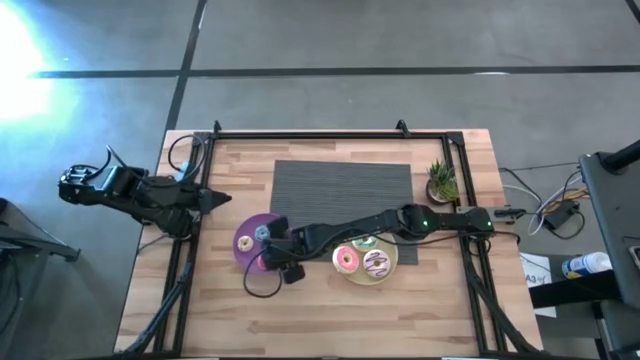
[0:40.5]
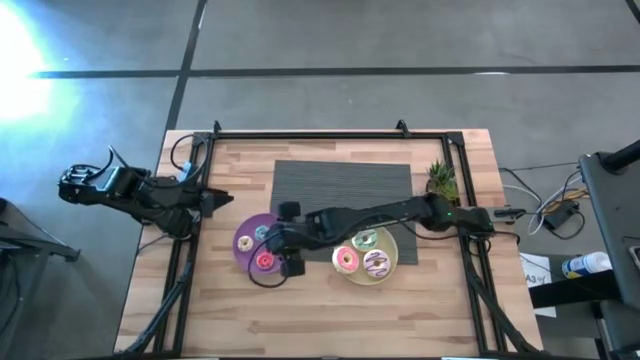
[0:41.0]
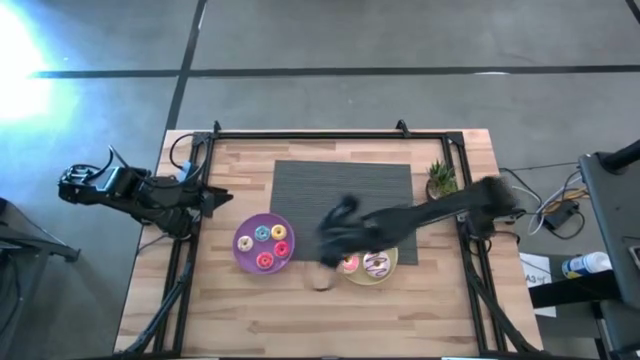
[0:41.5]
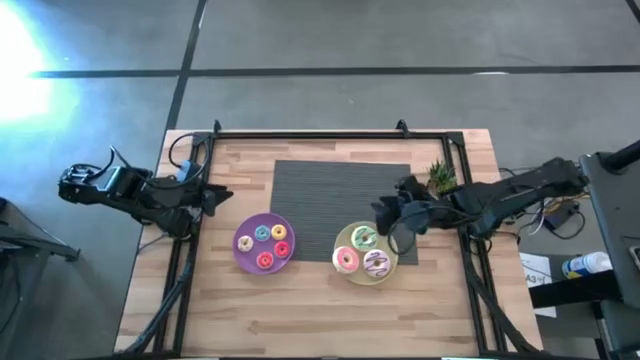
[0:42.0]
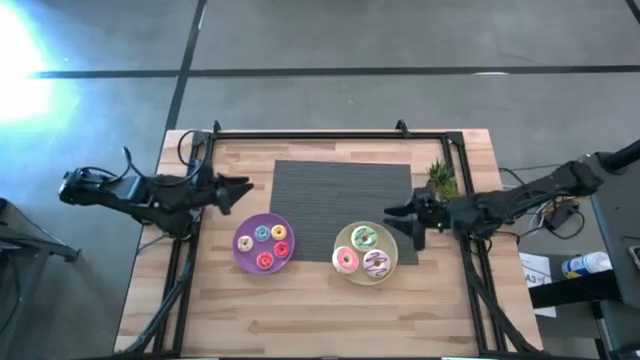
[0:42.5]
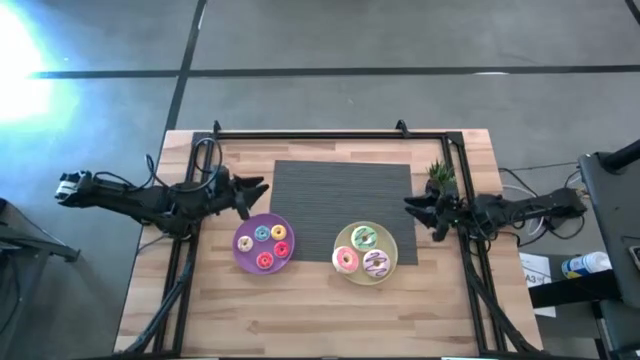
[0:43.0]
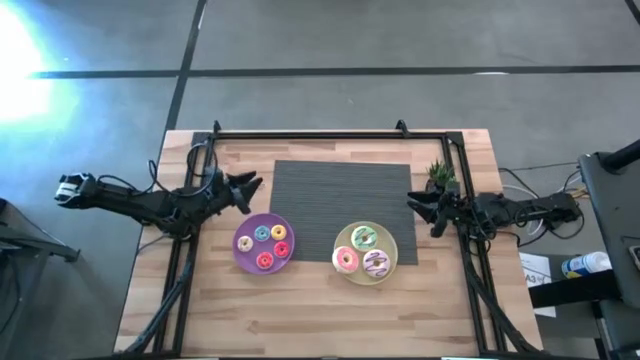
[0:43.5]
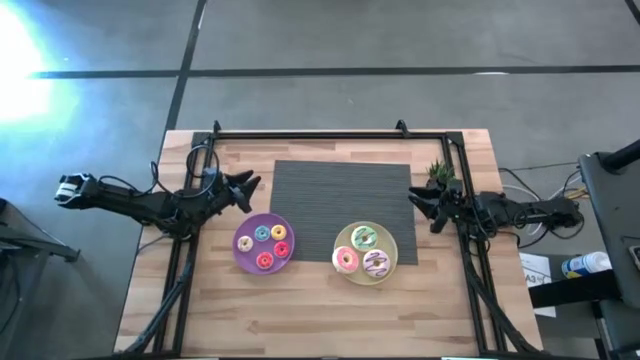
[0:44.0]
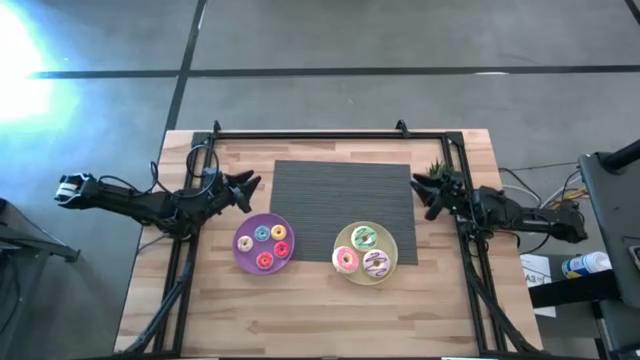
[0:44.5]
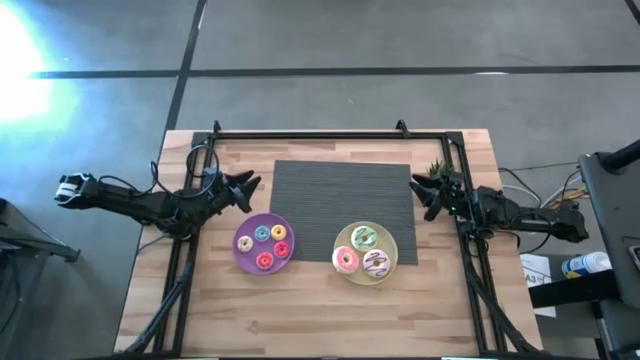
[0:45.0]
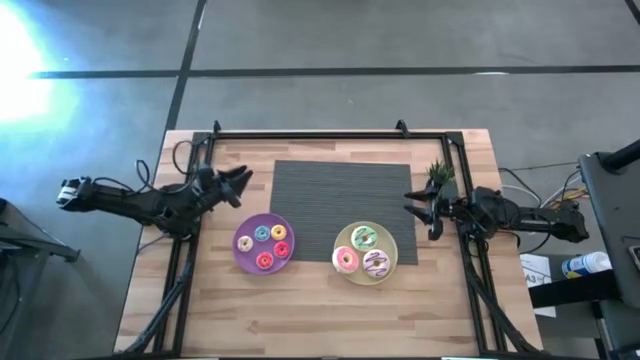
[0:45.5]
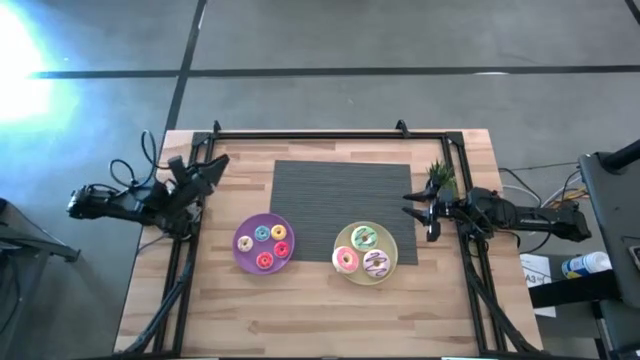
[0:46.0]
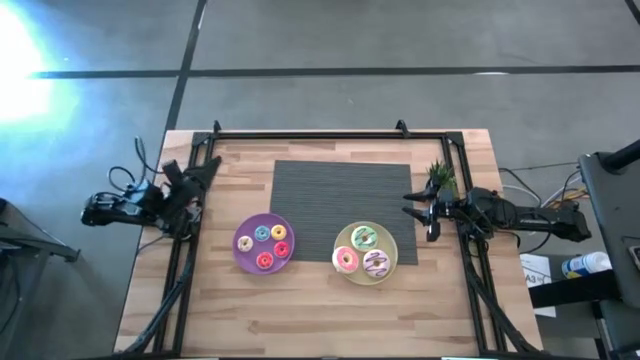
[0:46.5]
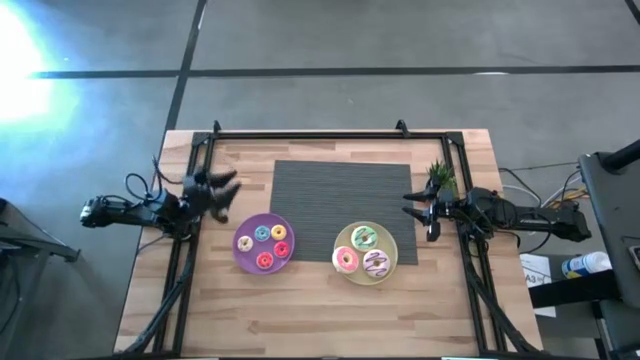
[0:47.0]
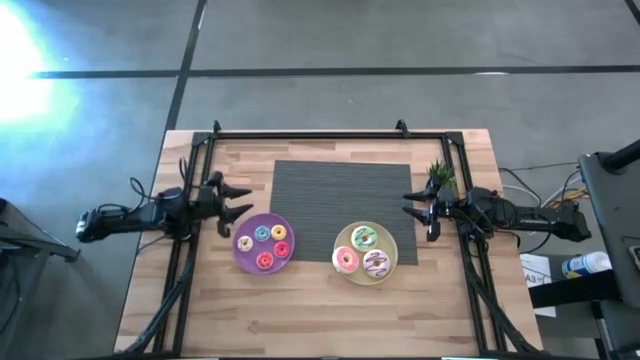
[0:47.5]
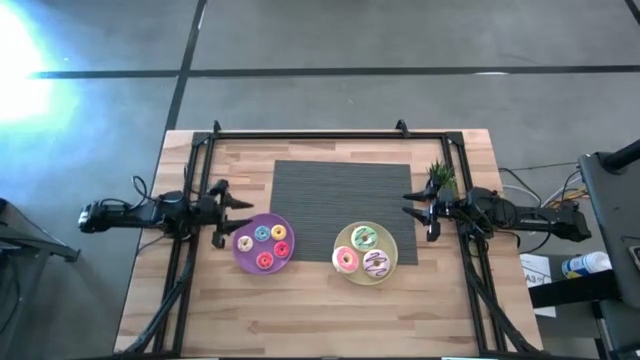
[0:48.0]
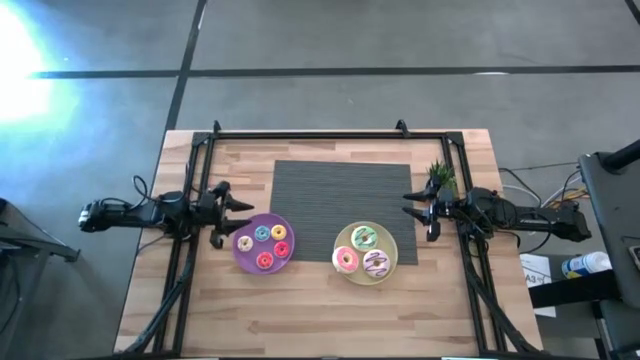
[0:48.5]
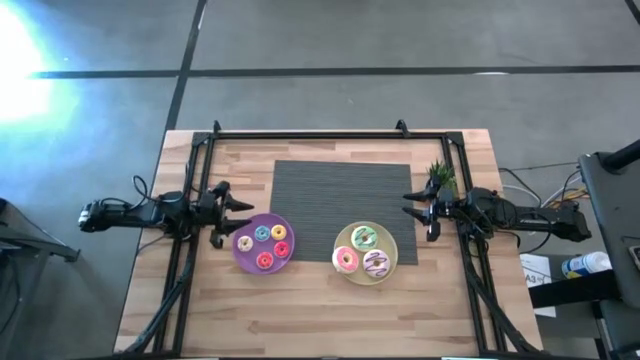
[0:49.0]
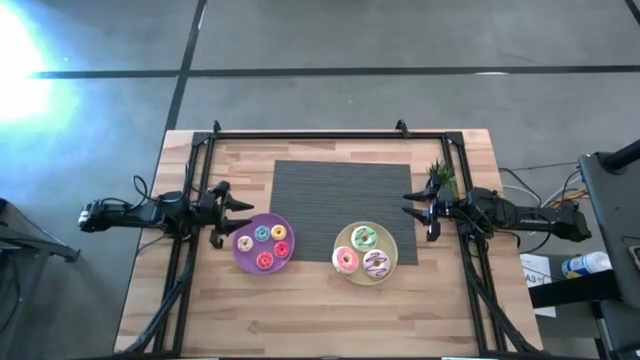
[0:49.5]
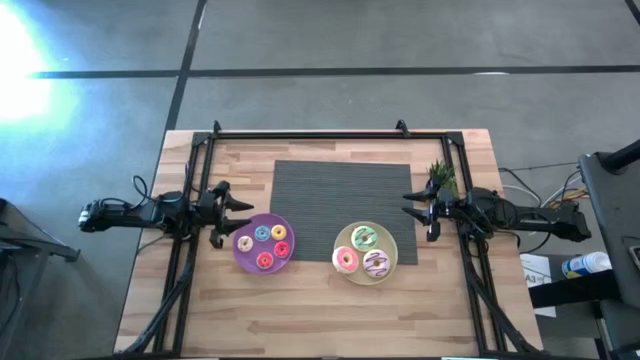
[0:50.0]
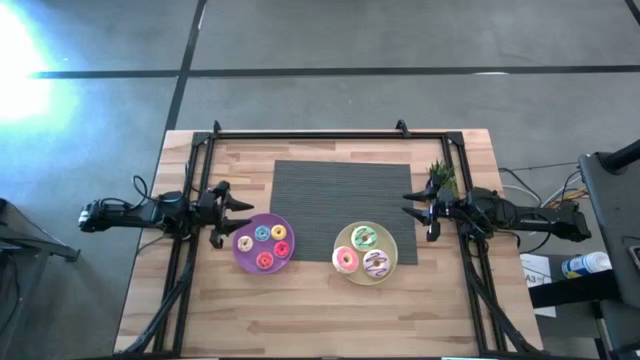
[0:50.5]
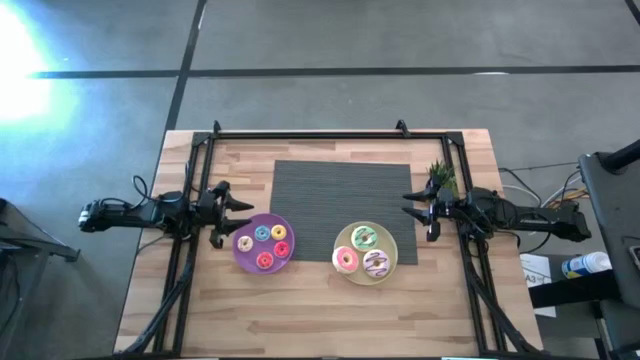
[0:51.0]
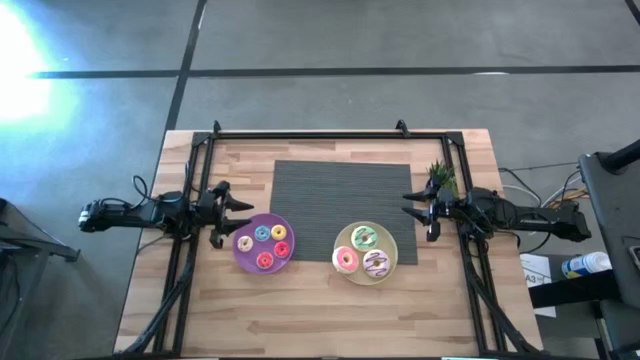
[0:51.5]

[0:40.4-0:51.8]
Task: Pick & Place donuts
Return to Home Position

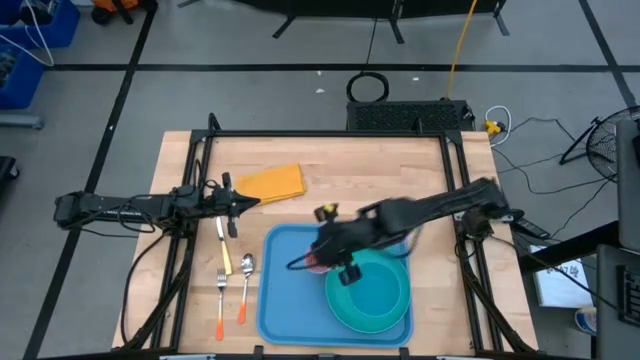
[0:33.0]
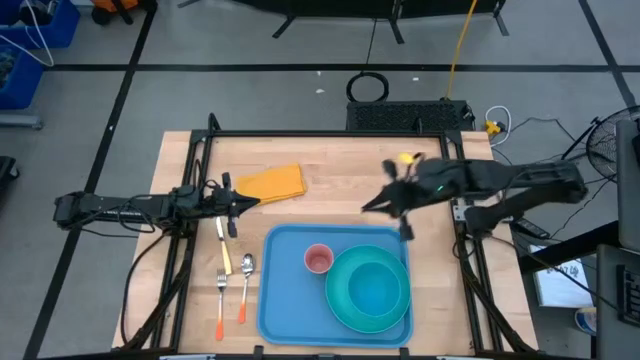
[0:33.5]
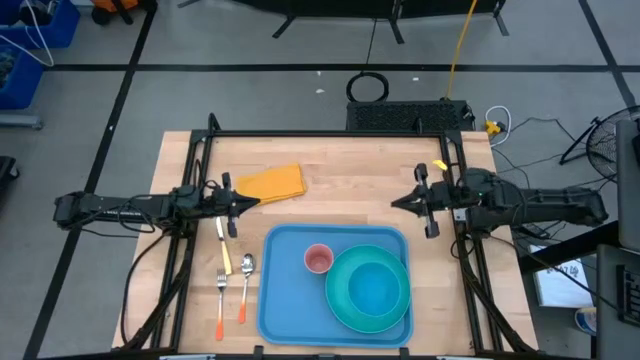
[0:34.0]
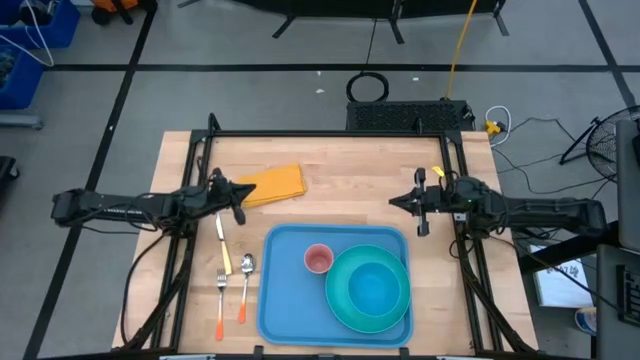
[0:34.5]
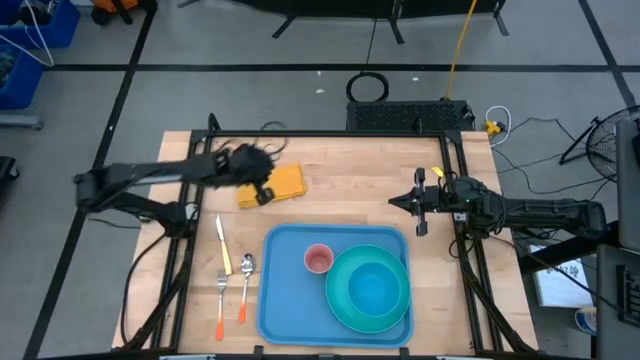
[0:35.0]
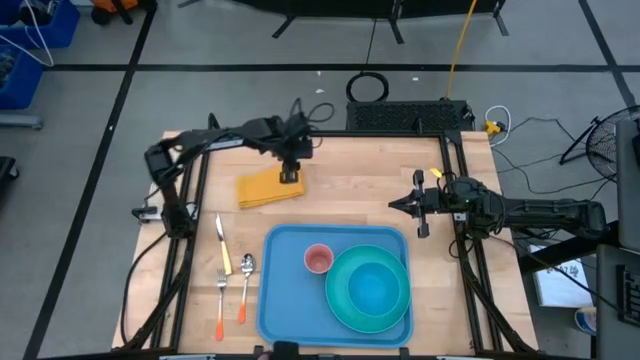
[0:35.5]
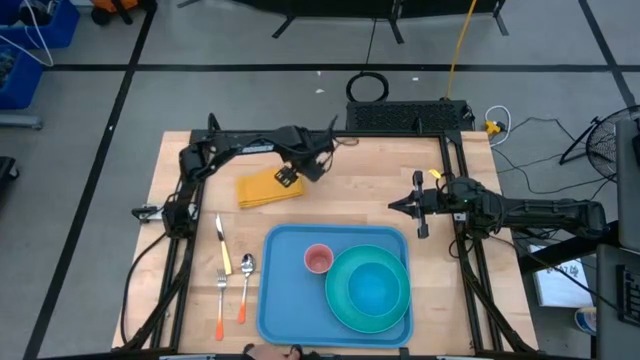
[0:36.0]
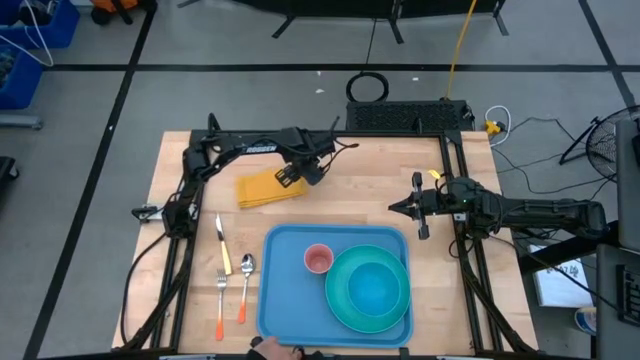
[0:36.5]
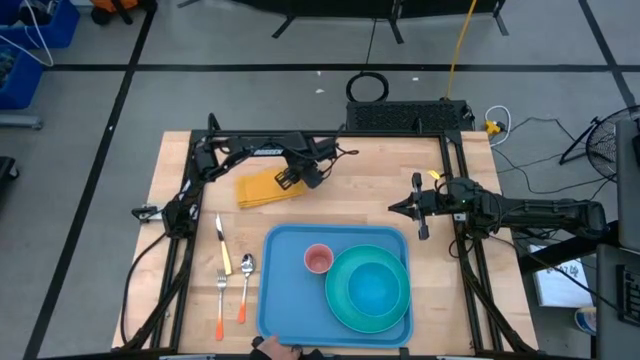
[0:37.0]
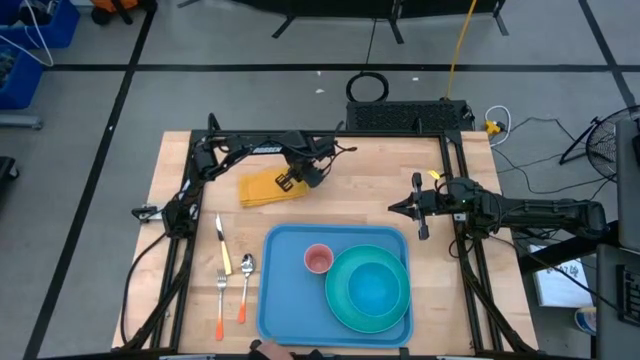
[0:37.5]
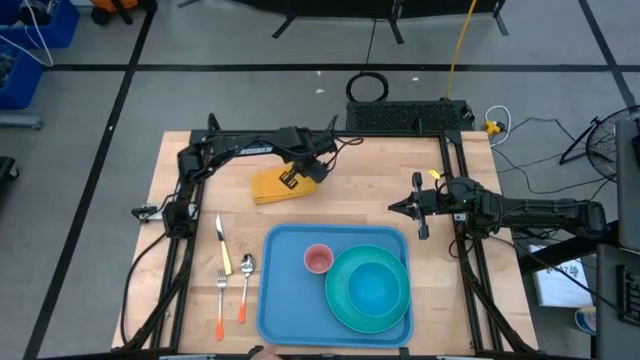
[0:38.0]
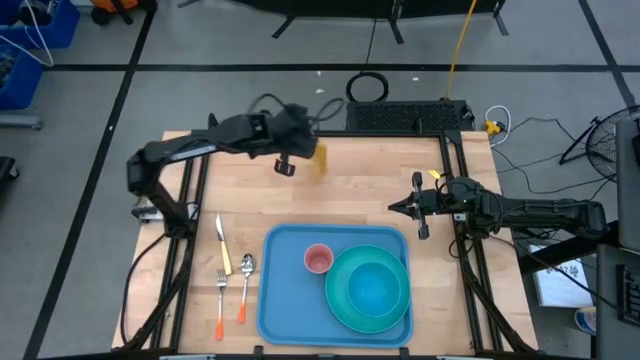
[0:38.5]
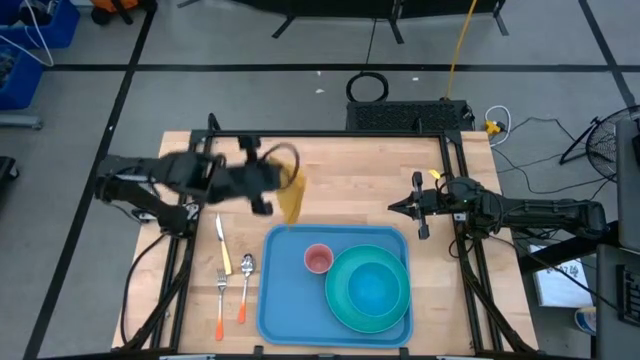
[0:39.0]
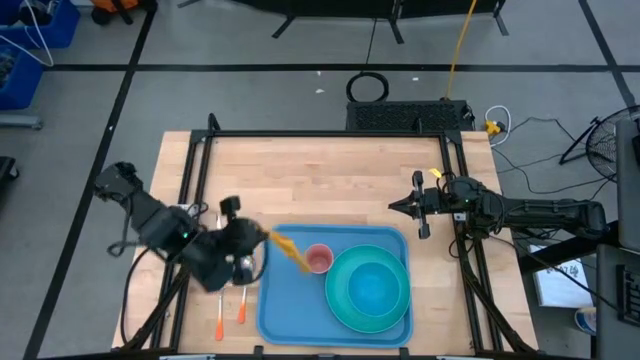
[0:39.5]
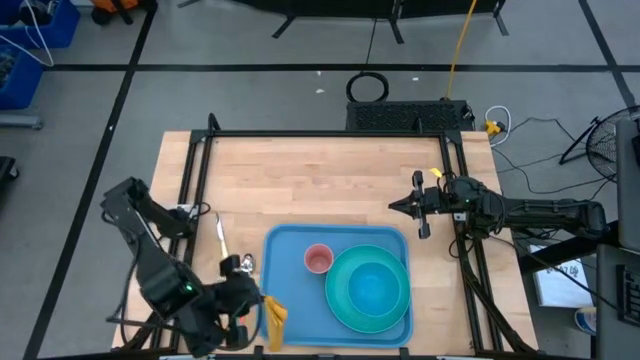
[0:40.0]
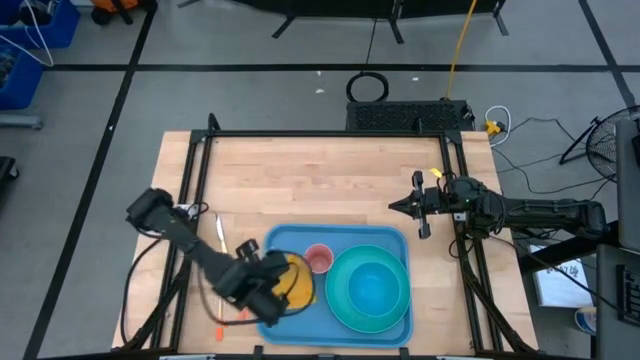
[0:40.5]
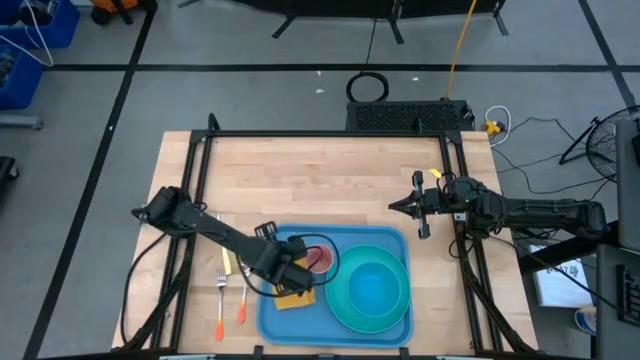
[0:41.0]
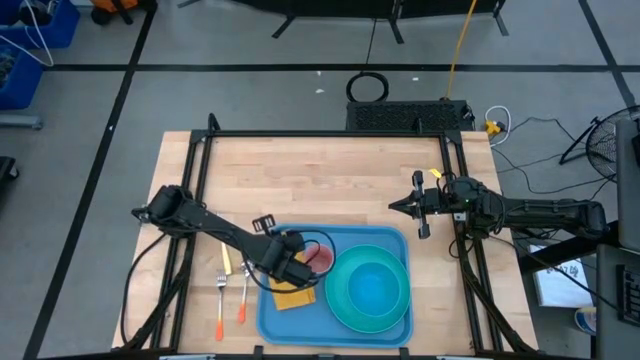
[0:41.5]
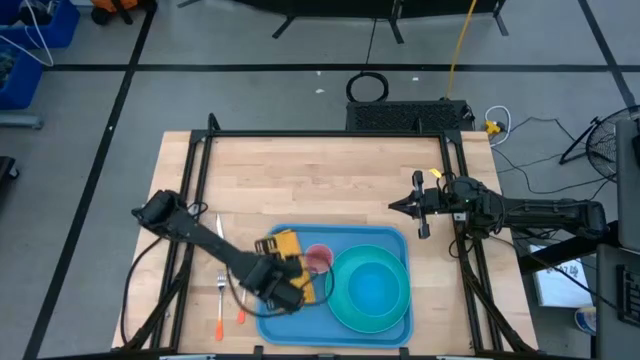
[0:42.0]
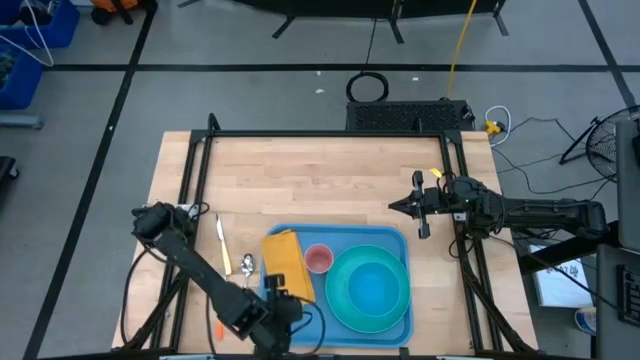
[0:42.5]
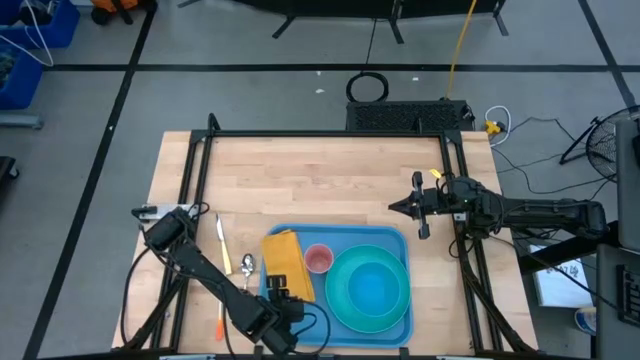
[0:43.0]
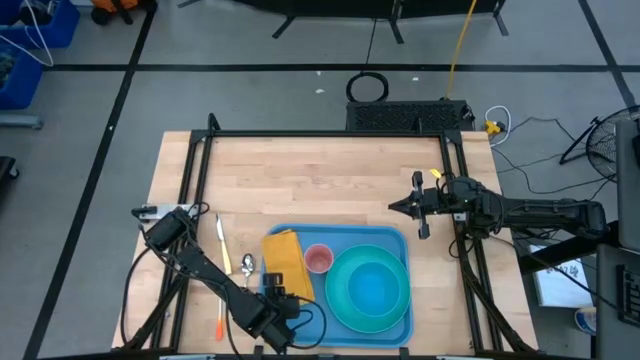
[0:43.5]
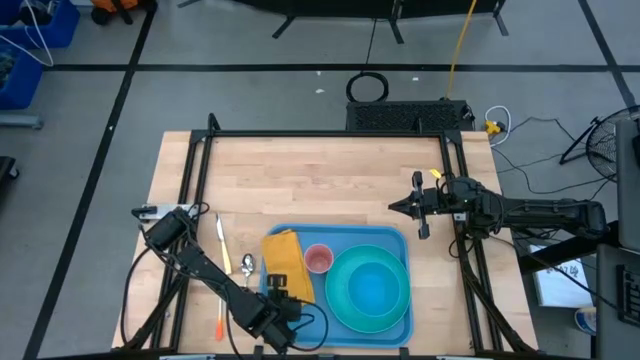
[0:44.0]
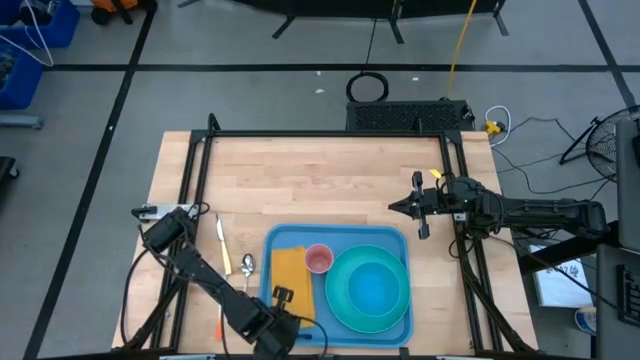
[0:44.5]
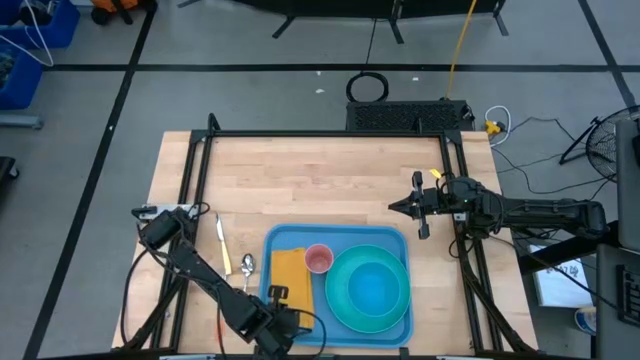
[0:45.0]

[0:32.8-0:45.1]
Task: Set up tray
Put the yellow napkin on the tray to the left of the pink cup
